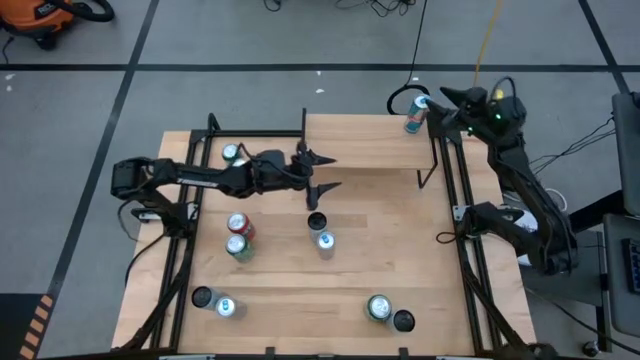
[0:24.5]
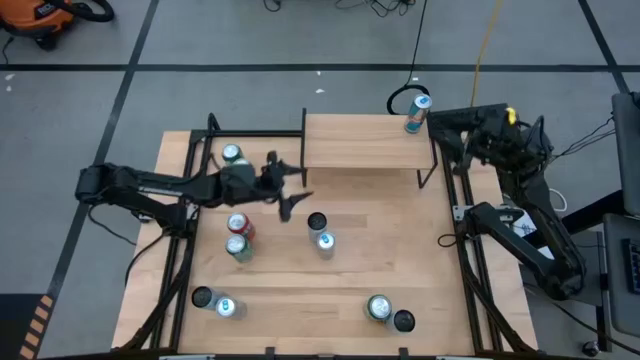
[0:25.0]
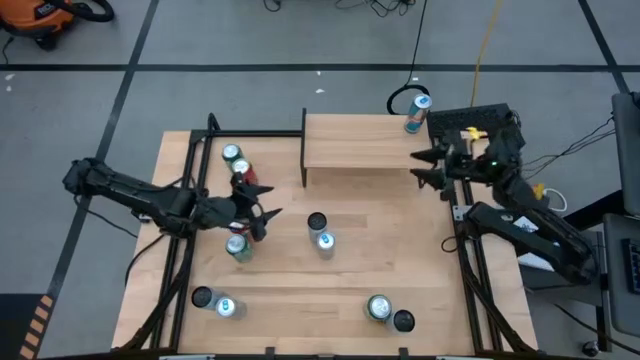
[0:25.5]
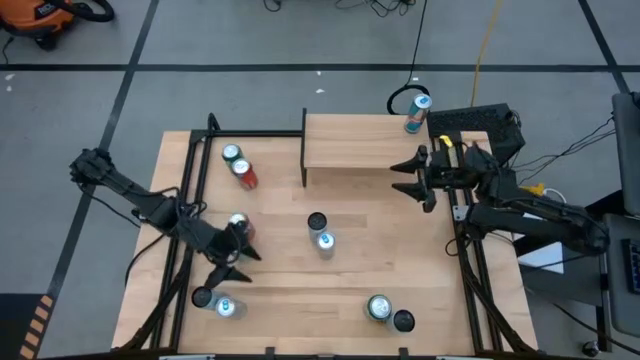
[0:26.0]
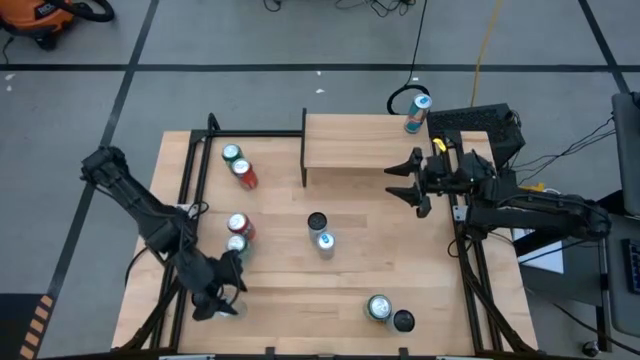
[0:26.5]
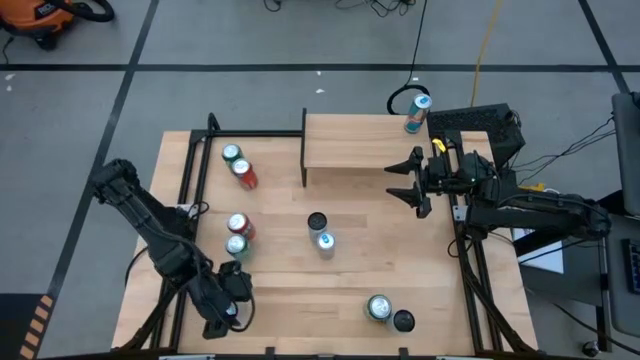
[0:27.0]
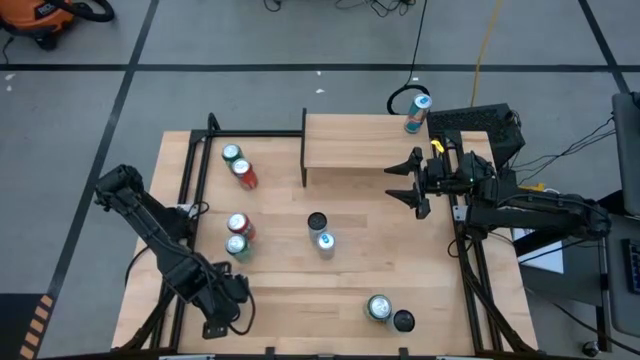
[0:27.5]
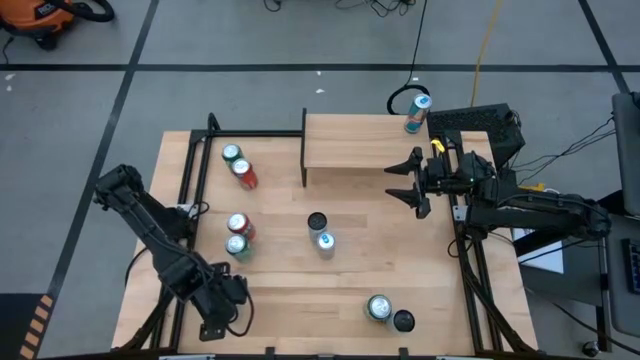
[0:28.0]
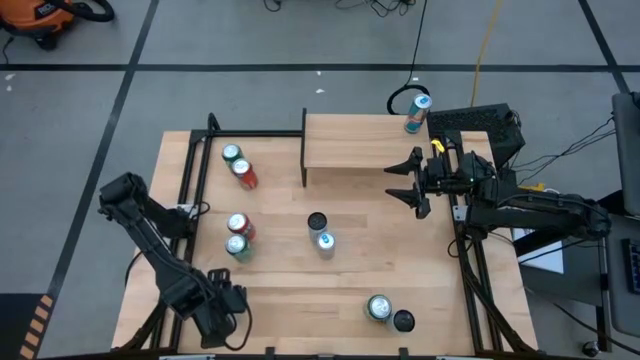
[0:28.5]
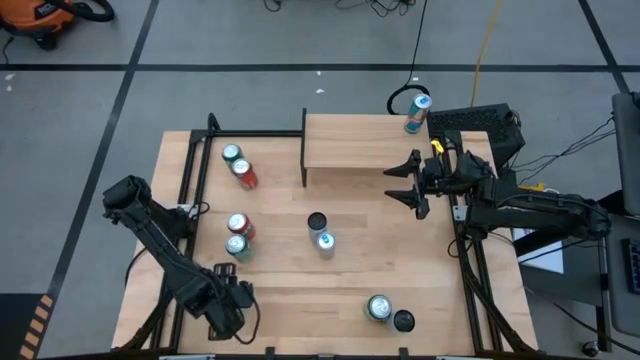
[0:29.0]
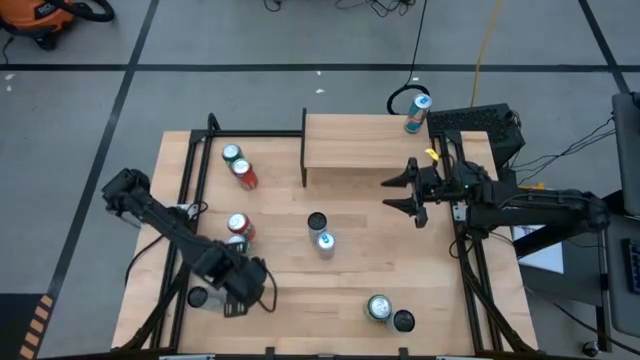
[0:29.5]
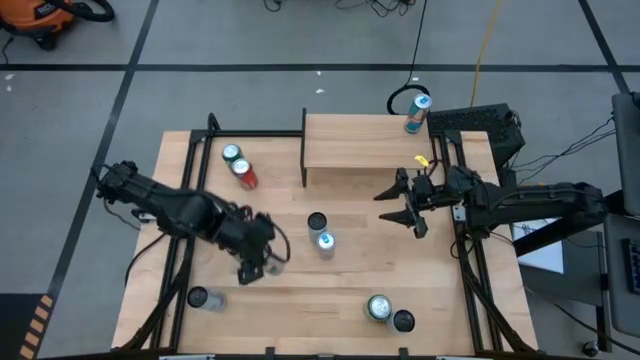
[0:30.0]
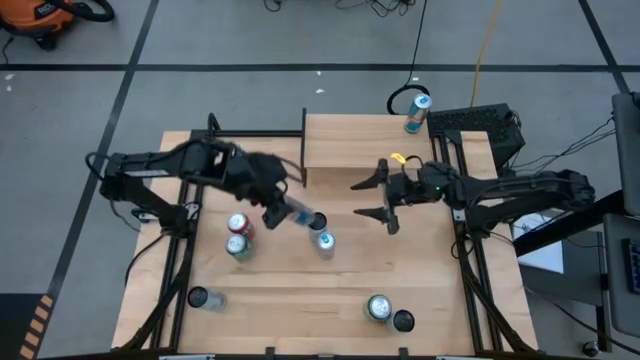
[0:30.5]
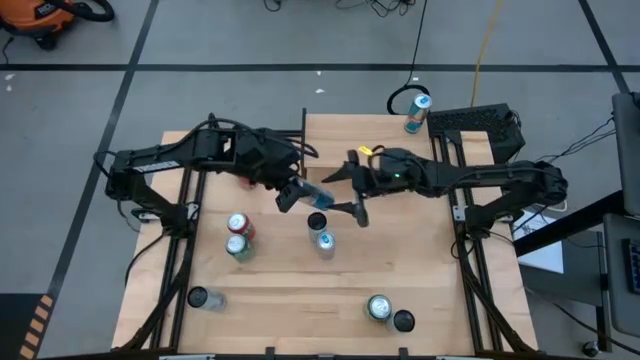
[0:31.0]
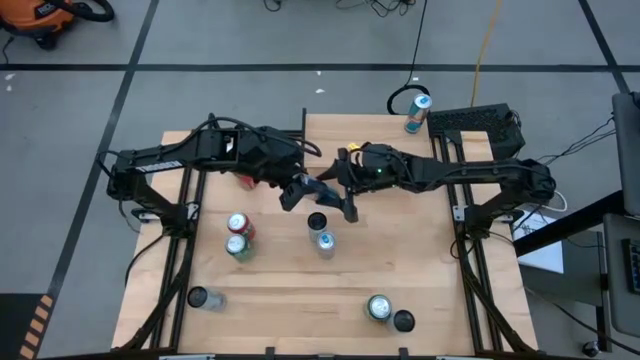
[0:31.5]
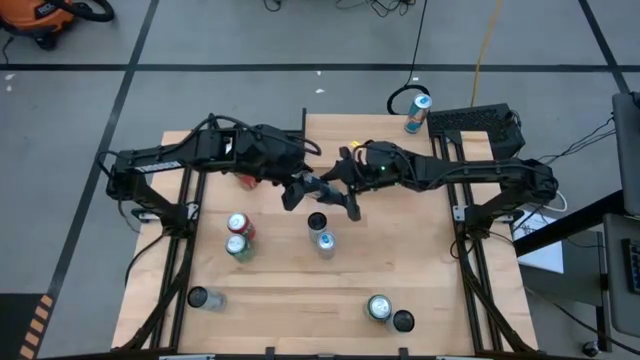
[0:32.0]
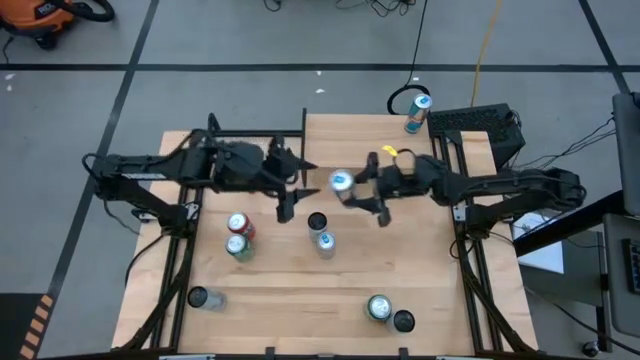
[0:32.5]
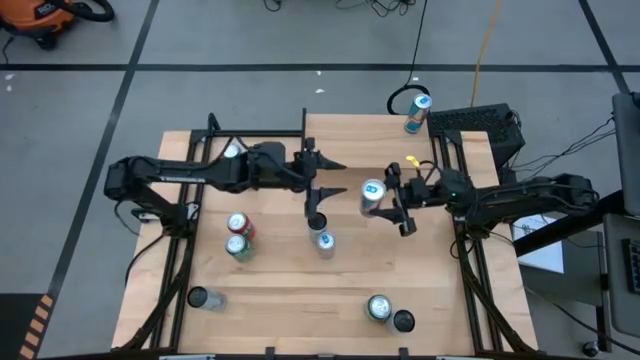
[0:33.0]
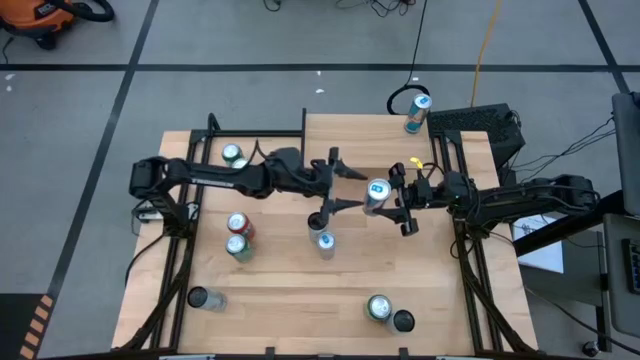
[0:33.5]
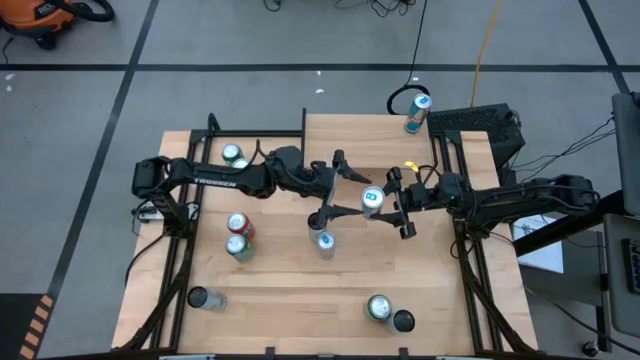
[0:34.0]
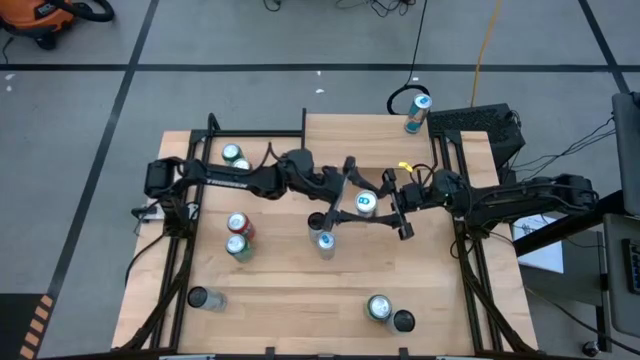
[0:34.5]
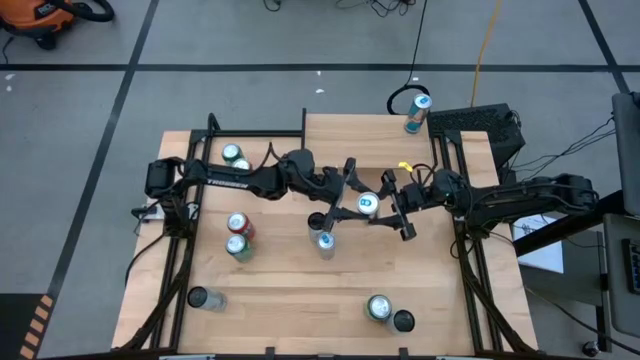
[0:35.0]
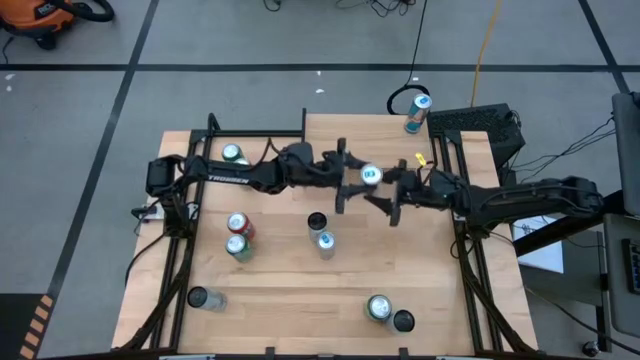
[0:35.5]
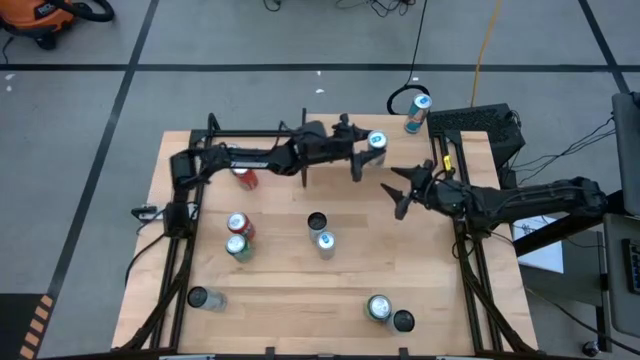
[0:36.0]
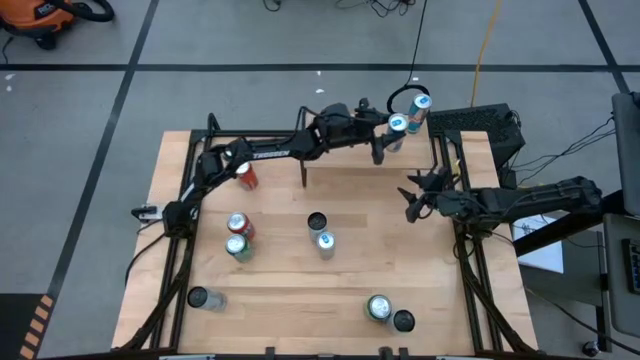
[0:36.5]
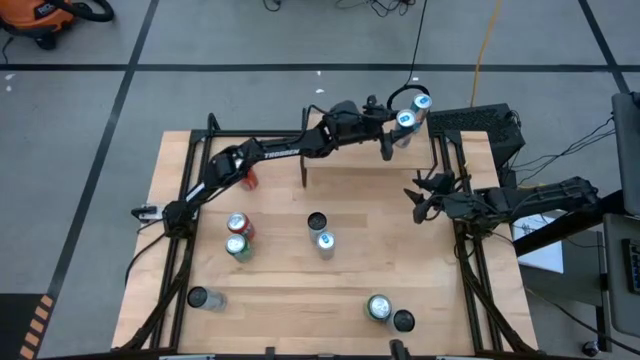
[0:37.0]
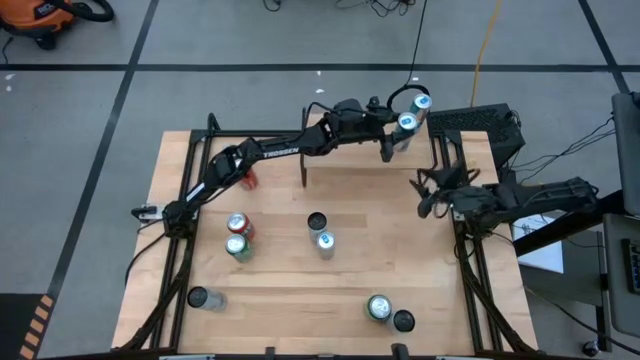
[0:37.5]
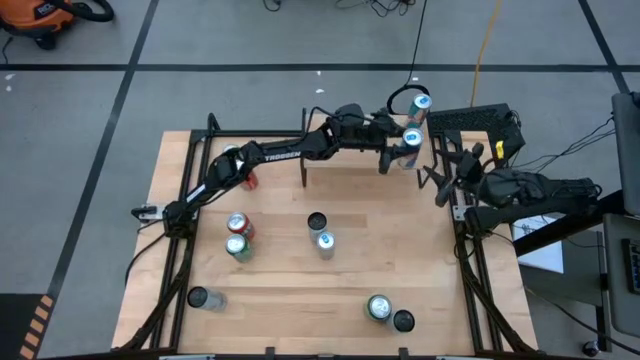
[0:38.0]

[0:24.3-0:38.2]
Task: Place canned beverage on shelf
Put the bottom blue soda can on the shelf aligned with the other blue soda can

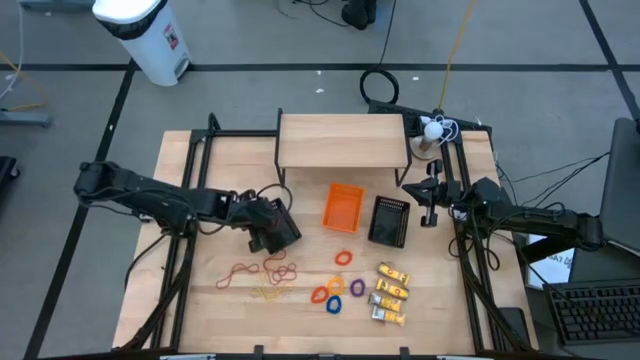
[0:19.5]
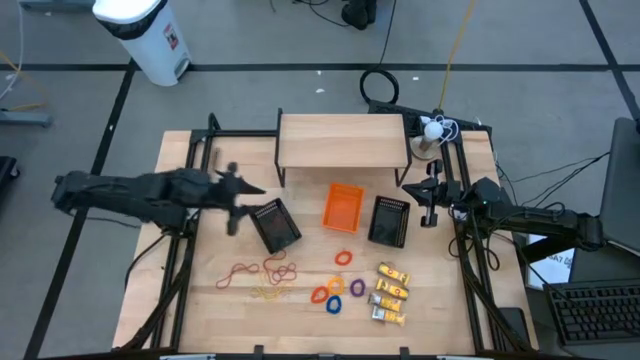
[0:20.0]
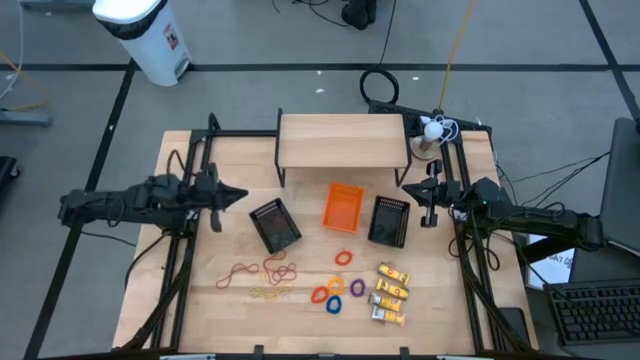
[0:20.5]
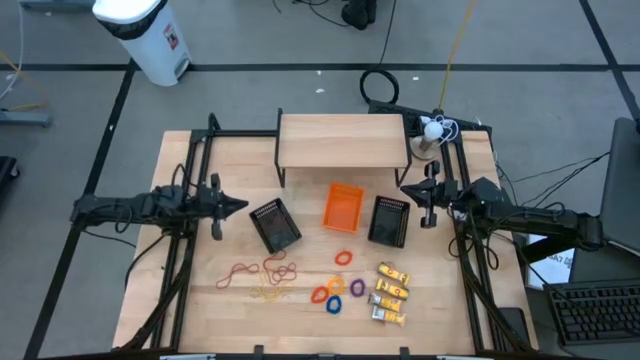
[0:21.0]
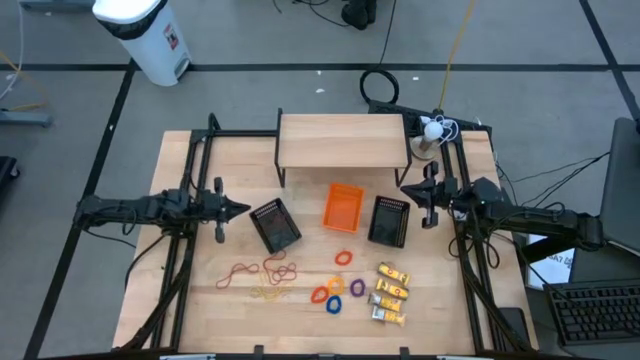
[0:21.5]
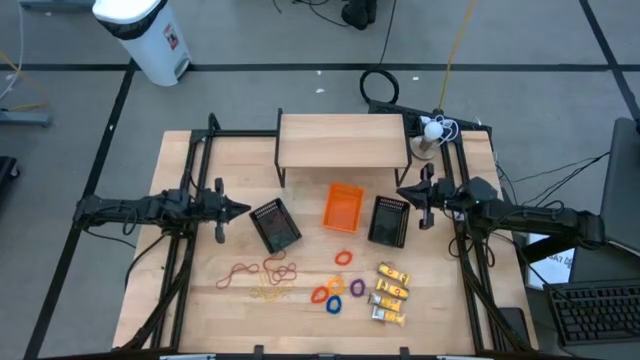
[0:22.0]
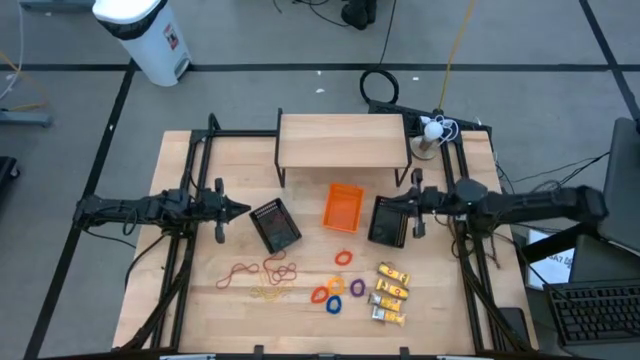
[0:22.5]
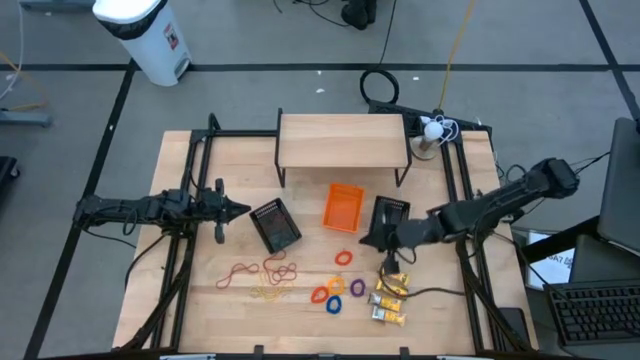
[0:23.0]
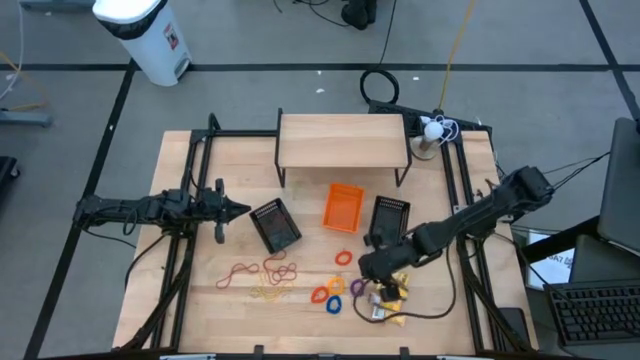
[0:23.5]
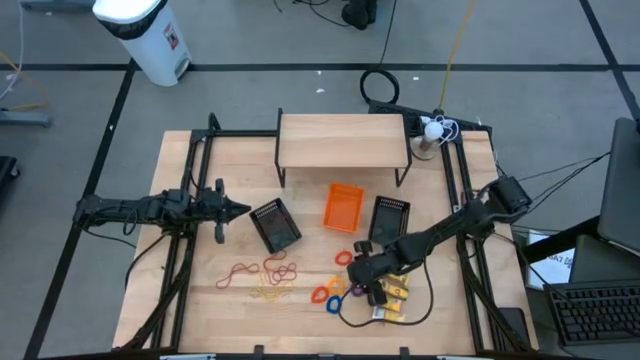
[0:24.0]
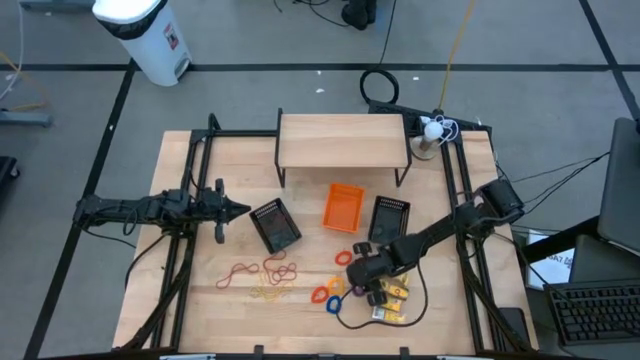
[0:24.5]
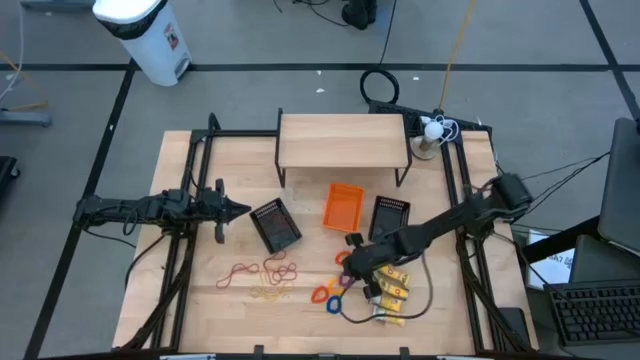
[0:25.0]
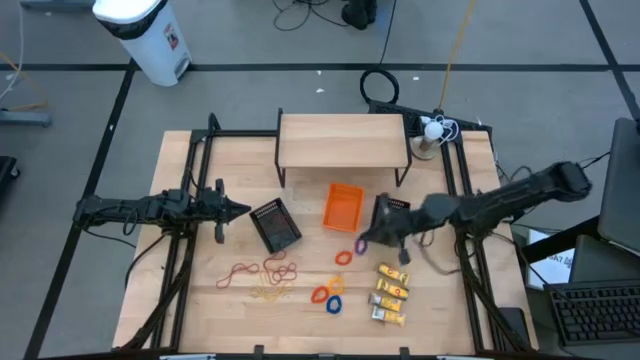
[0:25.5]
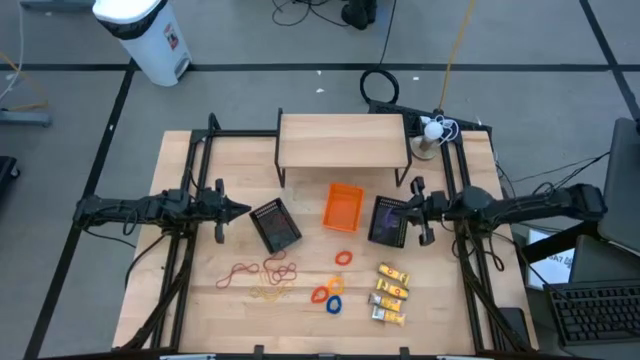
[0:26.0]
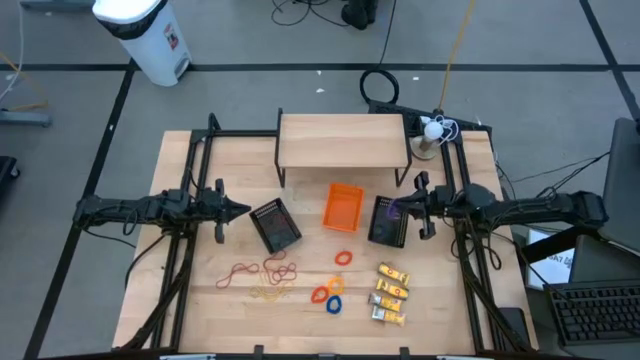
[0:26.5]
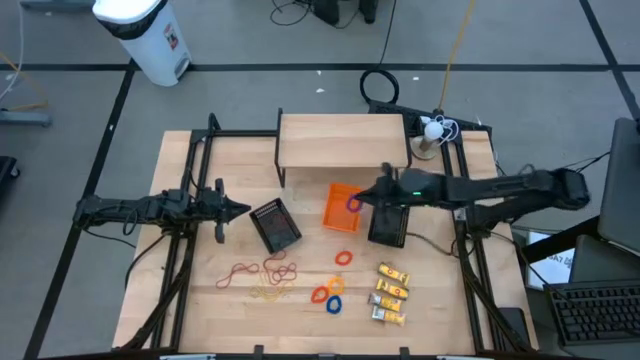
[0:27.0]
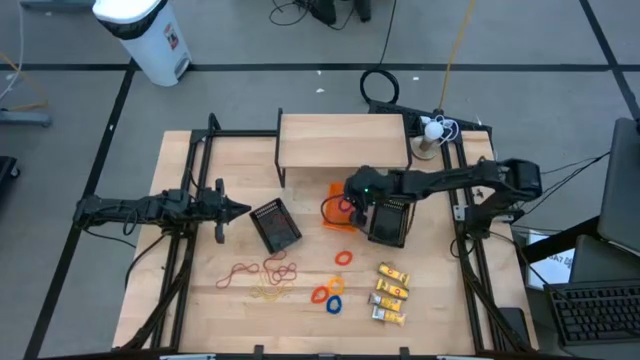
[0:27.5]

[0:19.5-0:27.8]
Task: Pick & Place Office Desk Supplies
Put the violet spring keychain into the orange bin
